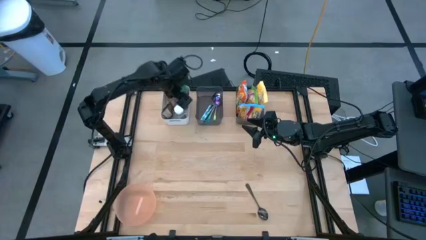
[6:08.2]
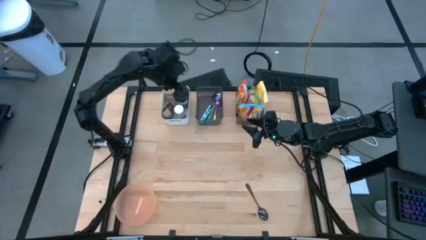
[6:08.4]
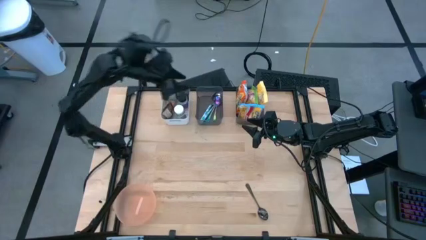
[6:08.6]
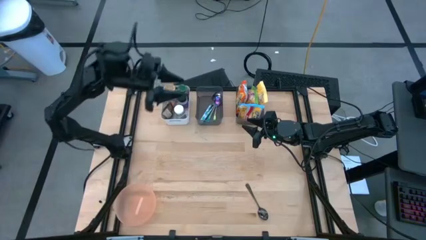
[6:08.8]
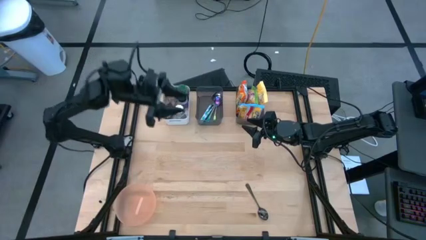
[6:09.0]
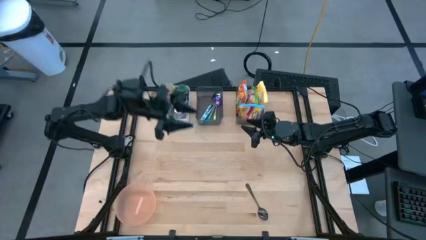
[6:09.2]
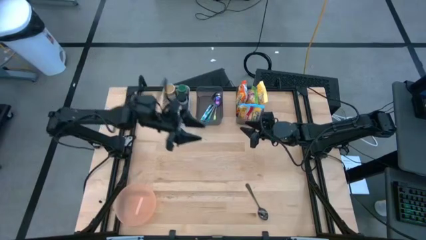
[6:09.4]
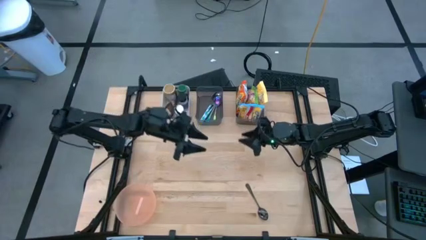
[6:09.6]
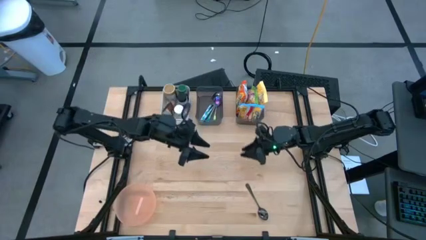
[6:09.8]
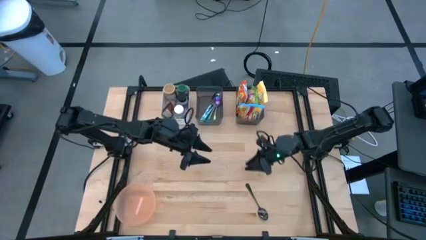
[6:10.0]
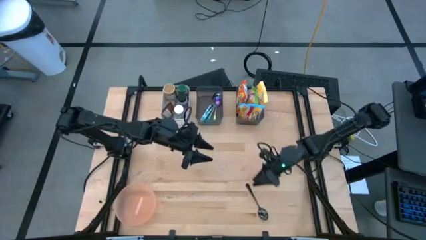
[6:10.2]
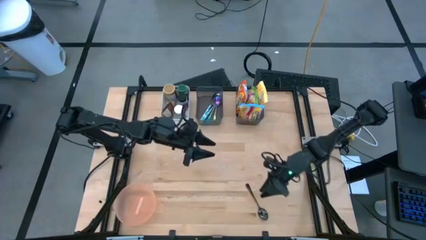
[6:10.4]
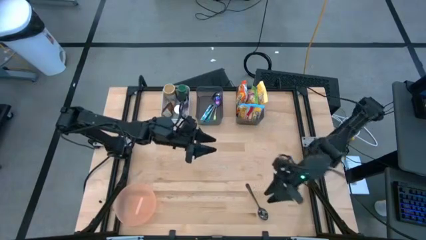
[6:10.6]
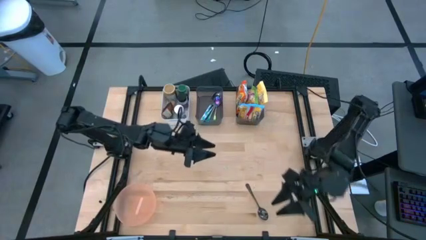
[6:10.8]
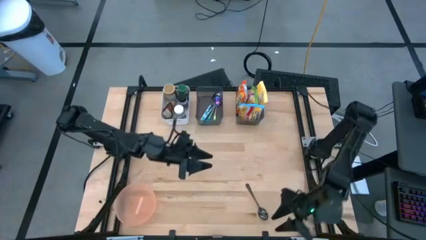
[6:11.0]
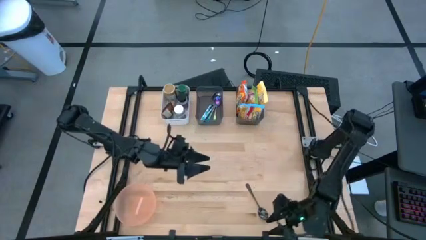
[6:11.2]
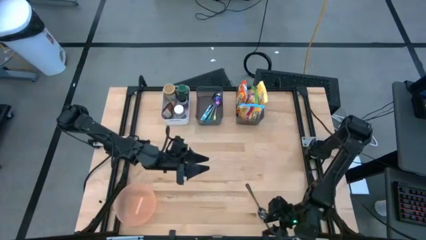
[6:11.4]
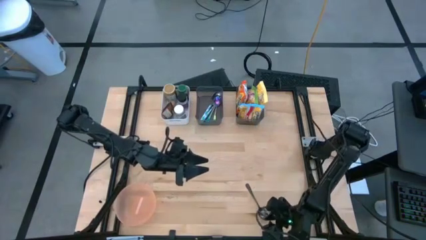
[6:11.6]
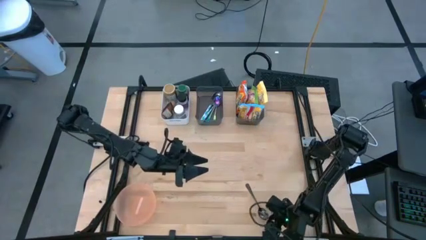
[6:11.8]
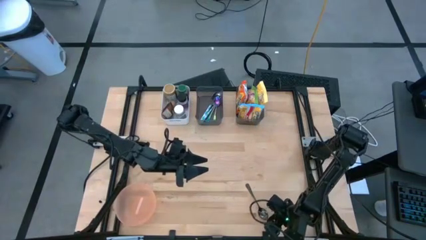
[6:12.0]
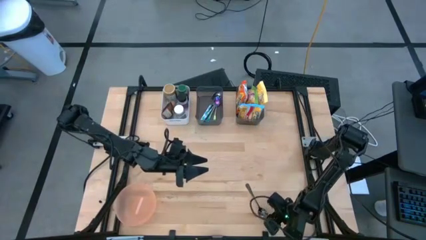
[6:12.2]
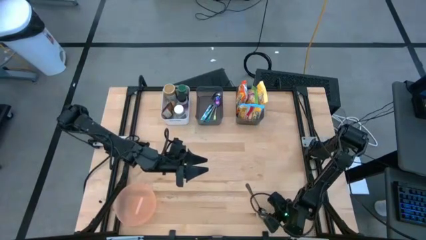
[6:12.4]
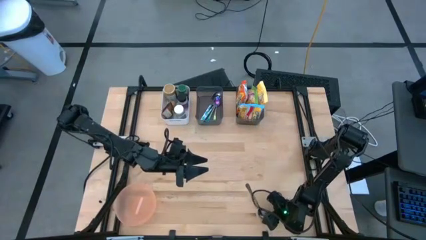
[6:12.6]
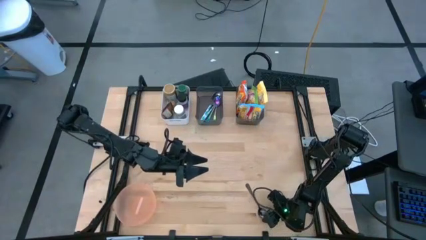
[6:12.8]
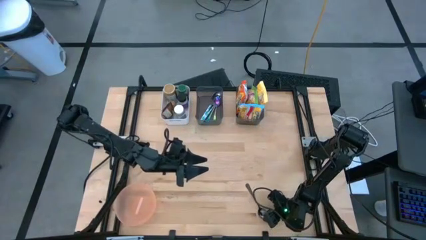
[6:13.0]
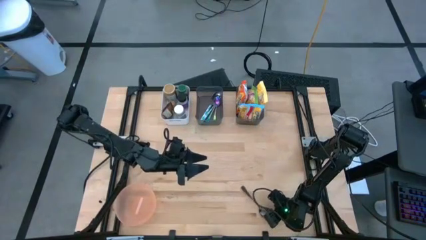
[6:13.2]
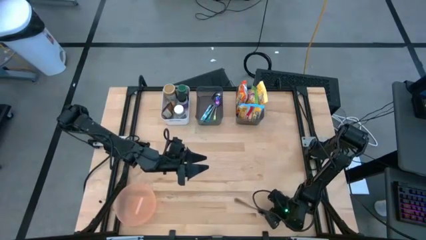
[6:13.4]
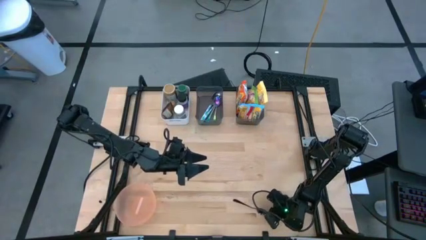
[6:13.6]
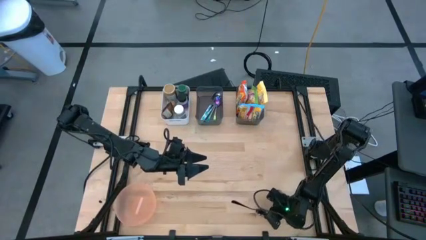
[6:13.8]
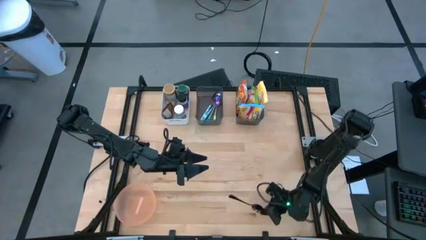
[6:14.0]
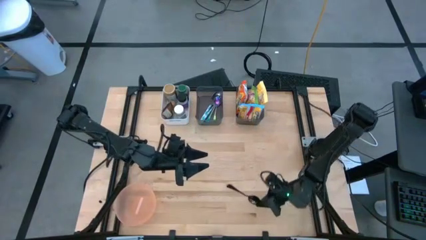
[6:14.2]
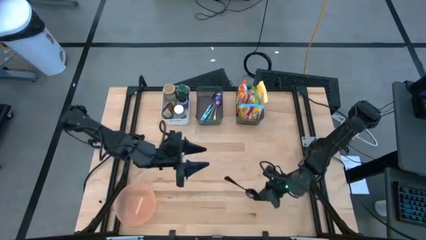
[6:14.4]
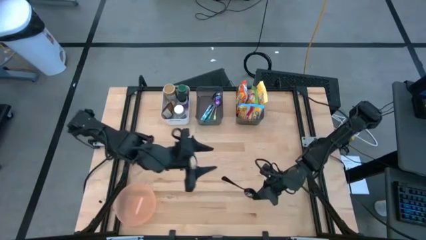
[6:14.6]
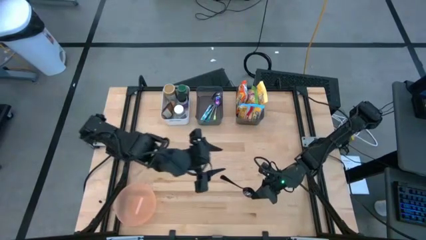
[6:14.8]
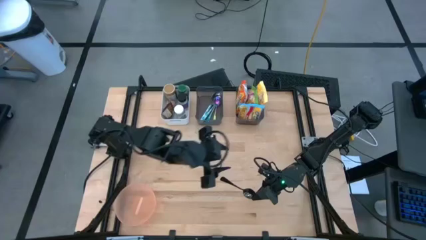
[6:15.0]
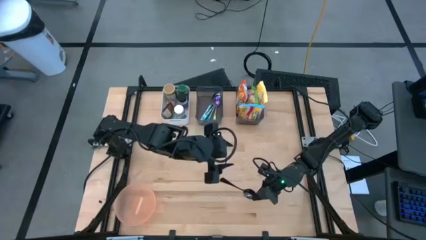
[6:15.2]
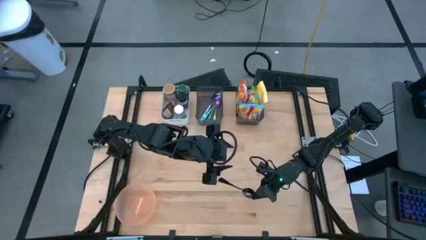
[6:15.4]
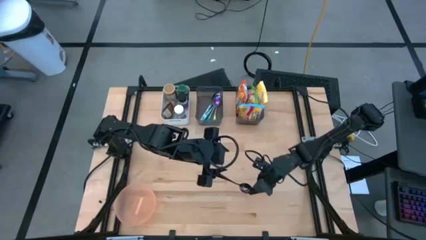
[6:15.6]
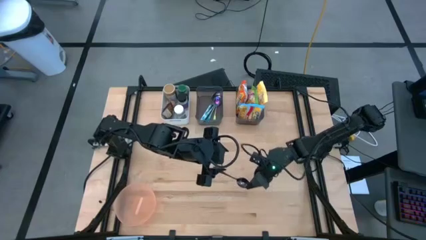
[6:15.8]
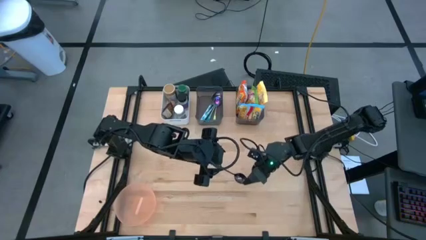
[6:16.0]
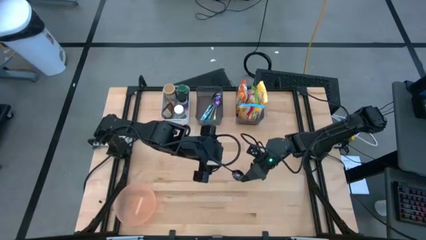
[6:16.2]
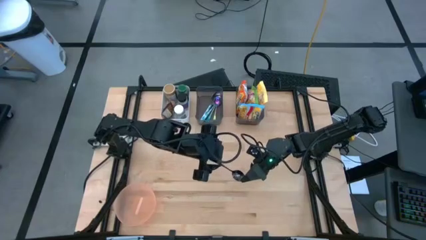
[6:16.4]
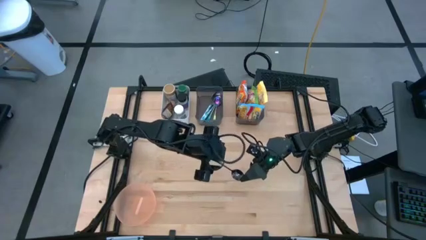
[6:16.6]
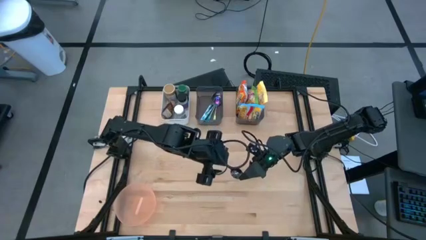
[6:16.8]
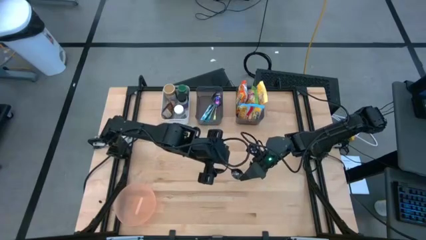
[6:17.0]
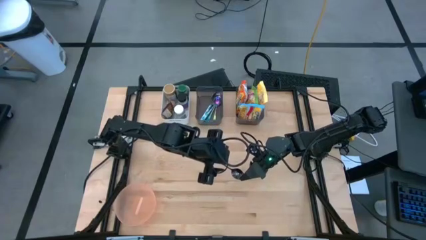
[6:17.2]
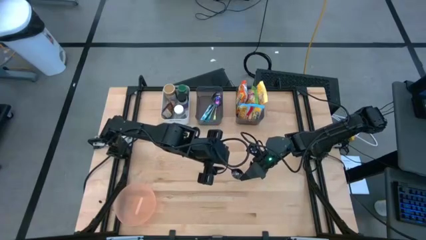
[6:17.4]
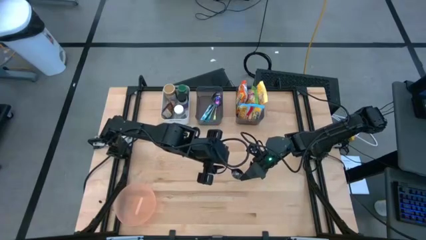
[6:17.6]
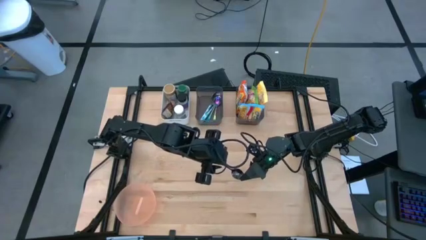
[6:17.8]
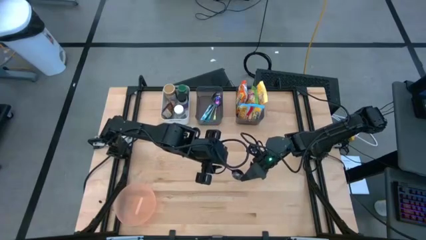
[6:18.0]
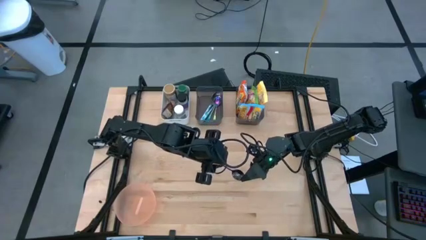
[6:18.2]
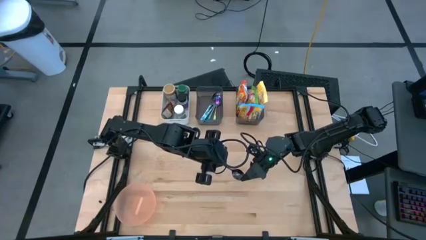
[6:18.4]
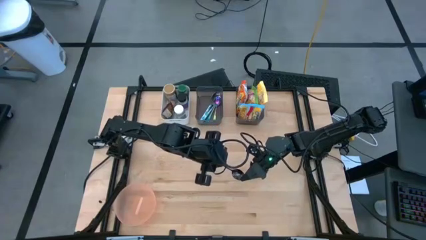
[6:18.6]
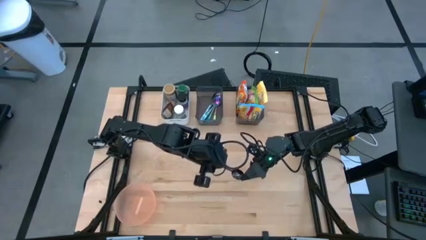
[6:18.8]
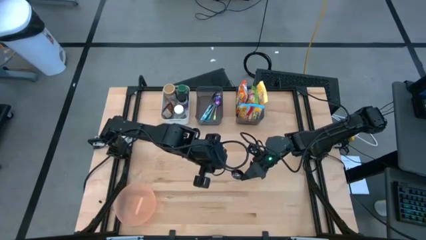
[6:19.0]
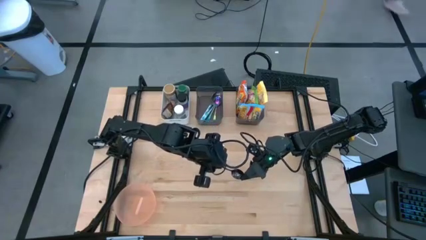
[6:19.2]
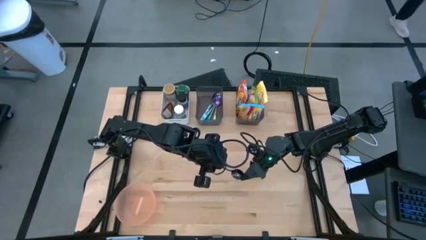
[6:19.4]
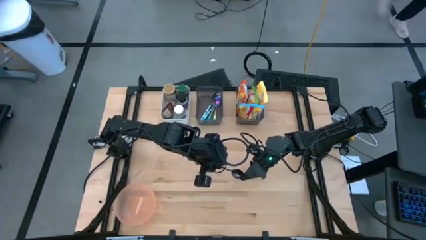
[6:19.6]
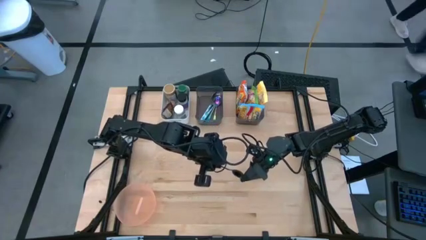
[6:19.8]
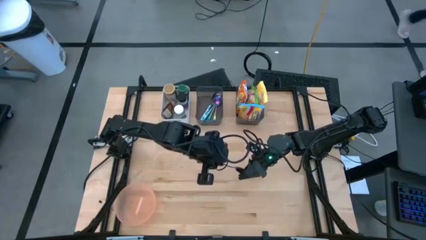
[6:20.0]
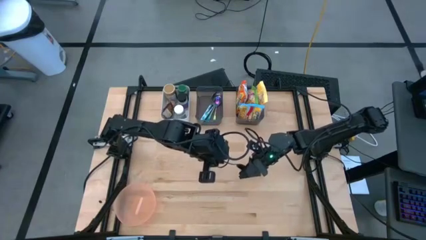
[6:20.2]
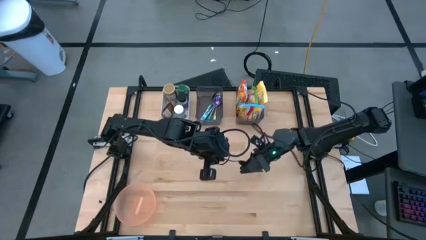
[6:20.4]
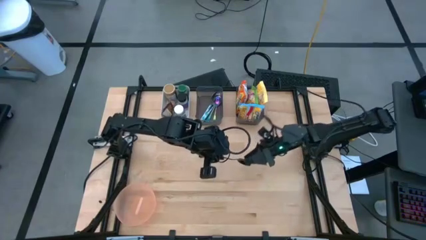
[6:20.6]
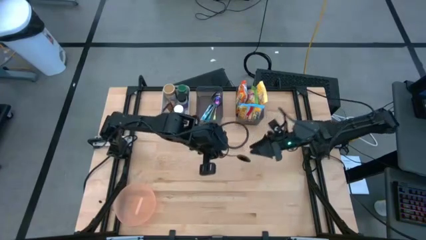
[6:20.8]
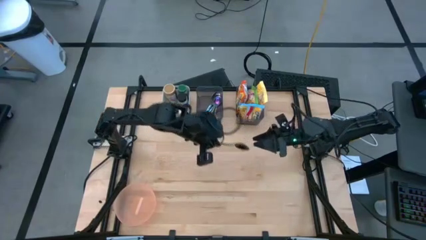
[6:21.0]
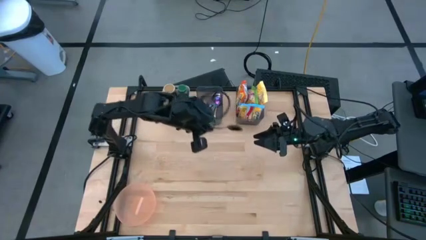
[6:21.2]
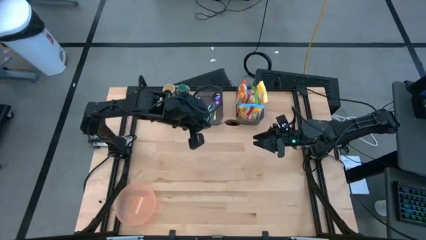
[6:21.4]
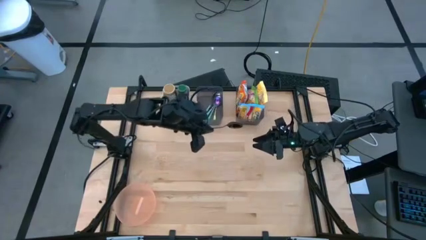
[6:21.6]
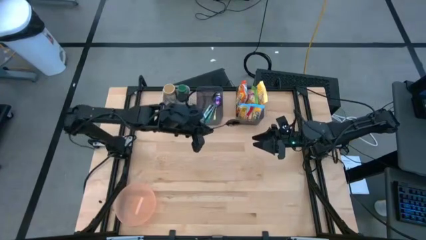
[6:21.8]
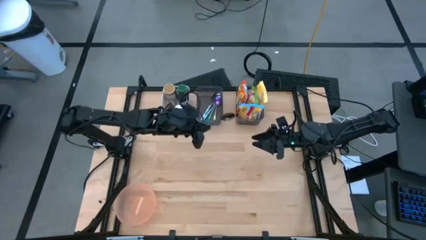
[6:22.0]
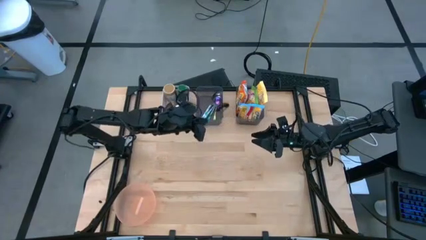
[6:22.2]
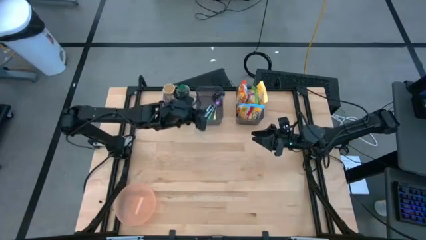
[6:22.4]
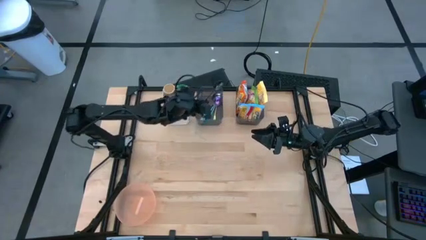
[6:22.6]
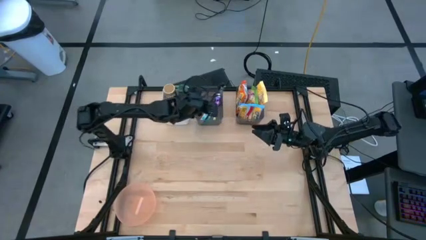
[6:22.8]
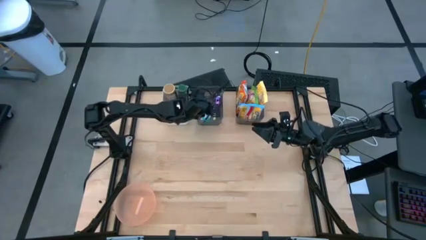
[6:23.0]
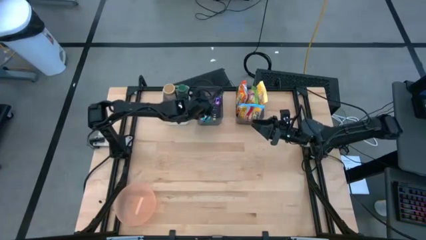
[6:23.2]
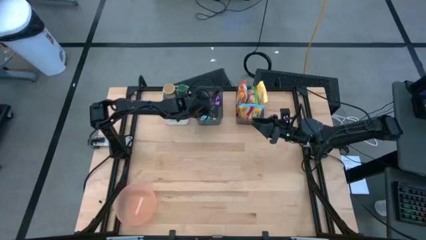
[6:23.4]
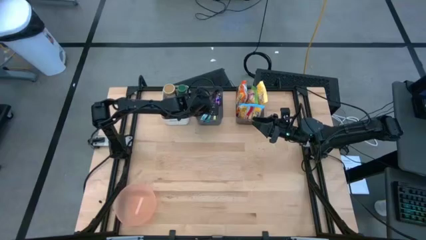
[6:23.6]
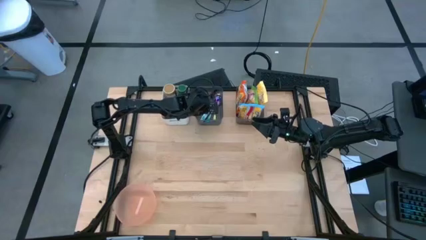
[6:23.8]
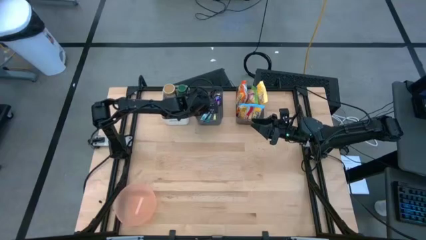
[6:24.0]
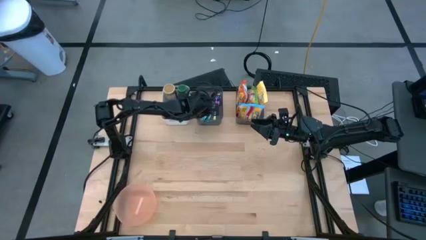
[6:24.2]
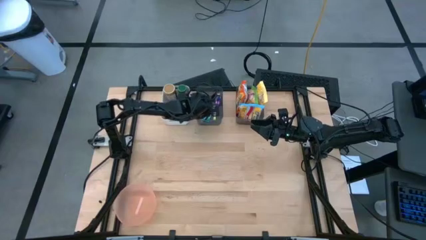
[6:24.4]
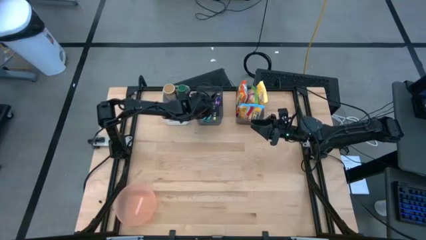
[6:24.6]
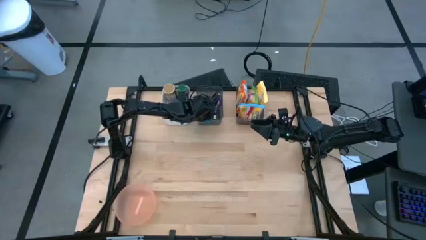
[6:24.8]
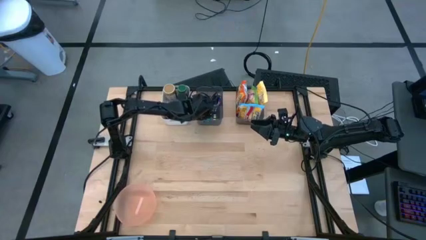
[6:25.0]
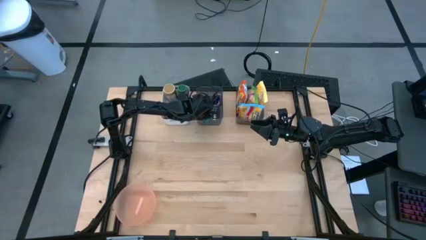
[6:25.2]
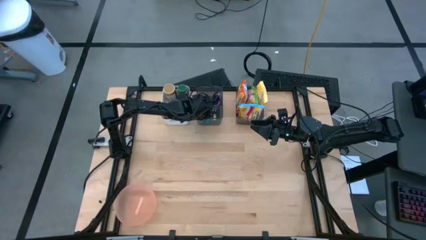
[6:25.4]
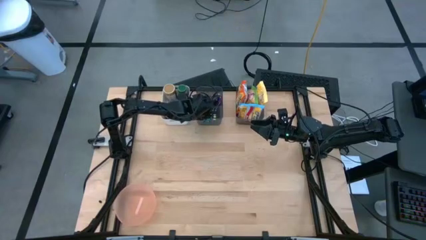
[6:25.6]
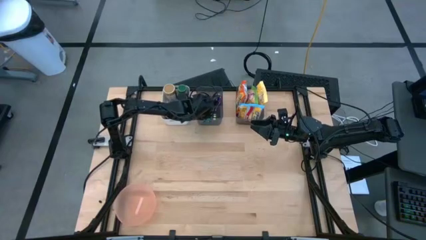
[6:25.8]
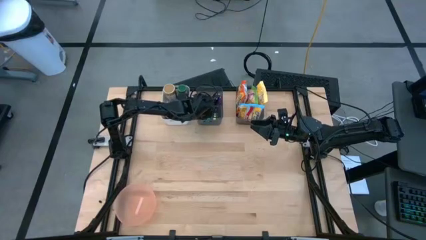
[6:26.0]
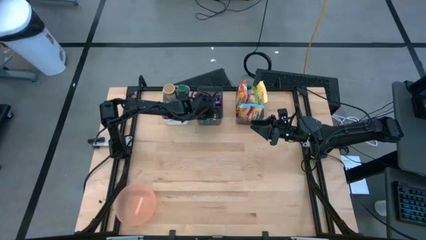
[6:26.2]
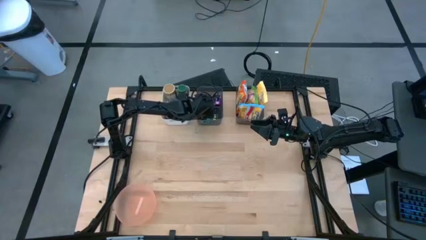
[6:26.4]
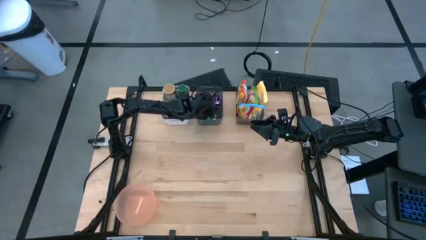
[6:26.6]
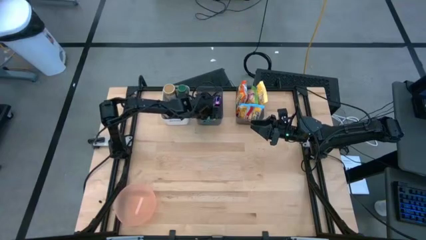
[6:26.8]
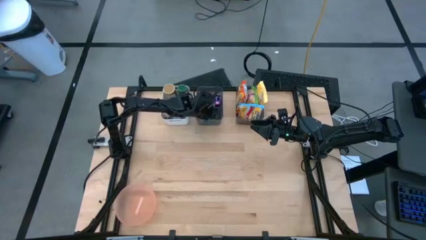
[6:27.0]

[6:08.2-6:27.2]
Task: Pick & Place Food Item
Put the black spoon into the left black bin
